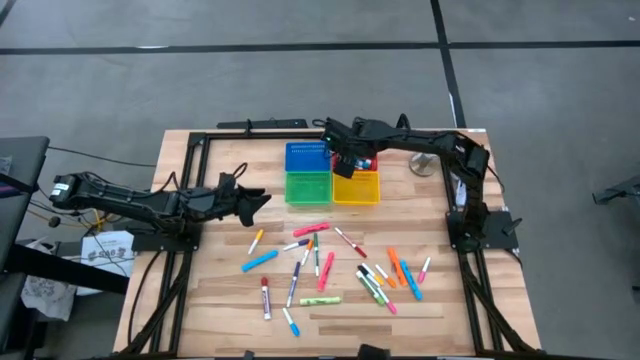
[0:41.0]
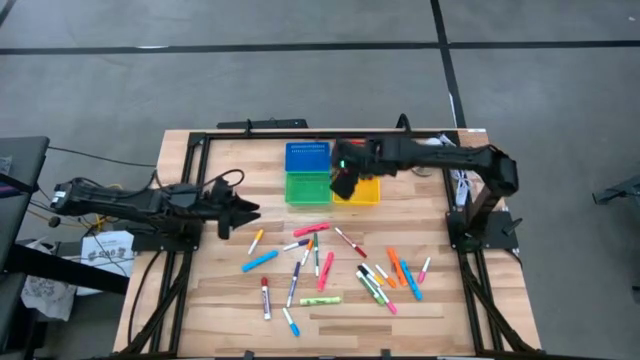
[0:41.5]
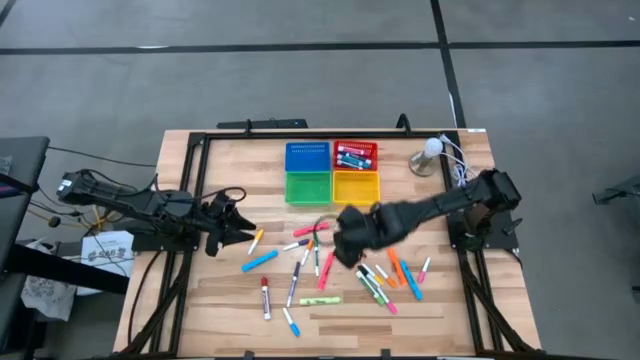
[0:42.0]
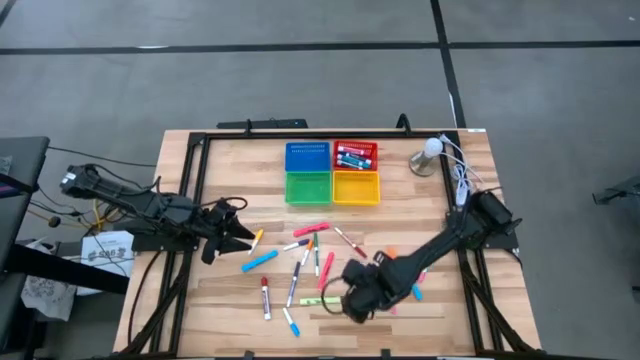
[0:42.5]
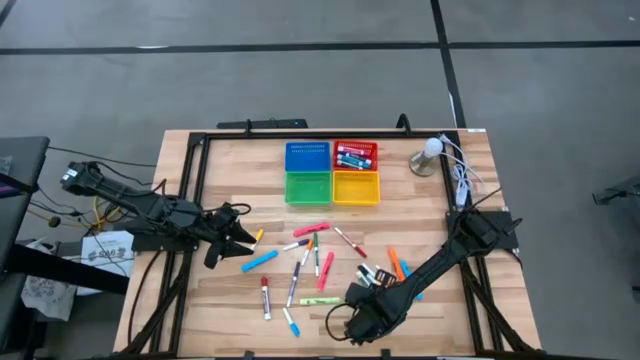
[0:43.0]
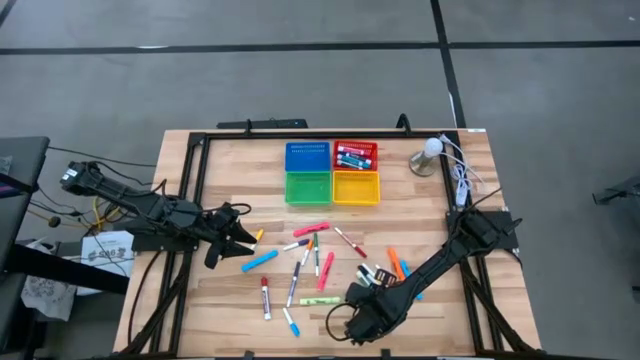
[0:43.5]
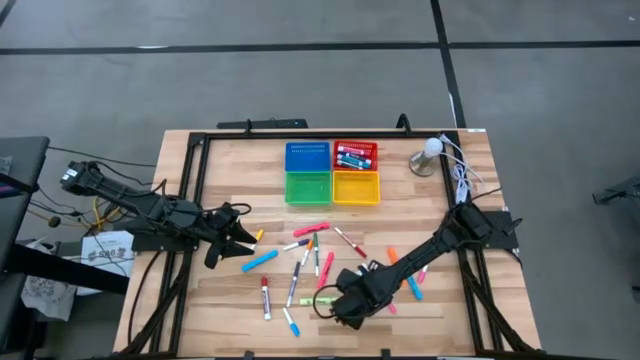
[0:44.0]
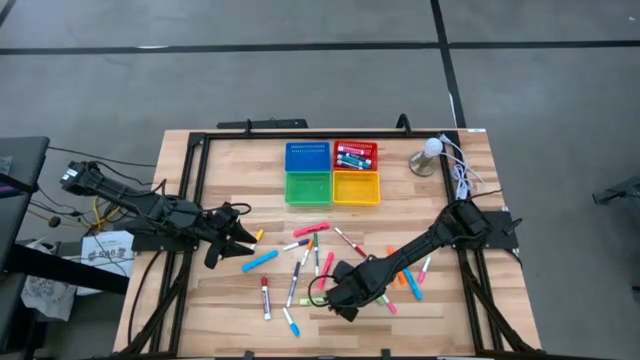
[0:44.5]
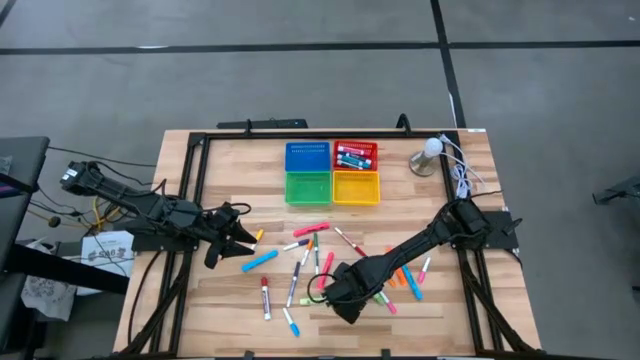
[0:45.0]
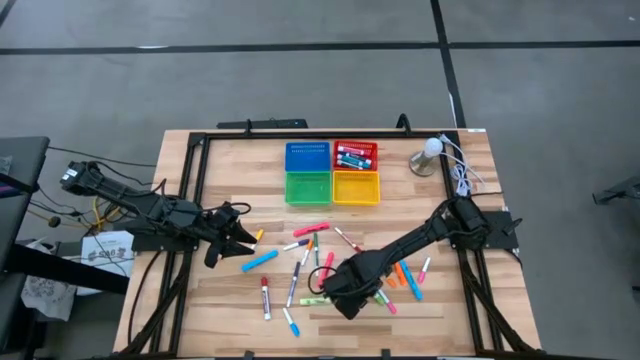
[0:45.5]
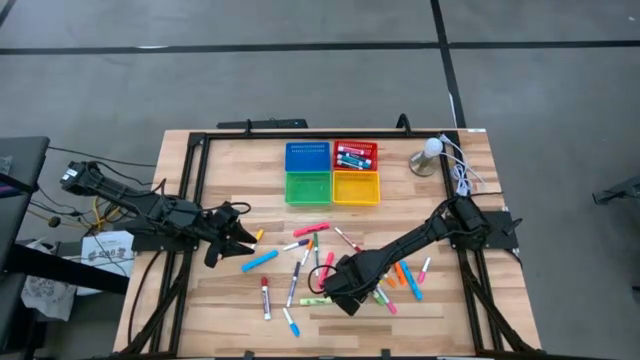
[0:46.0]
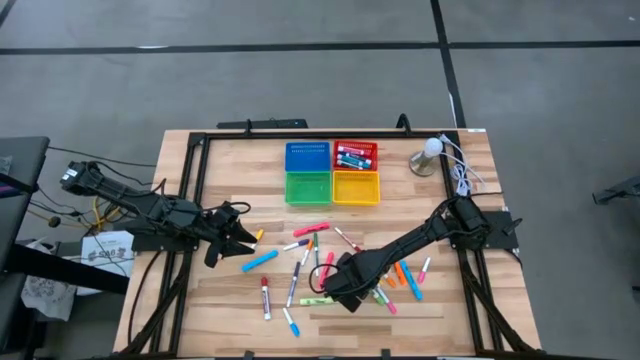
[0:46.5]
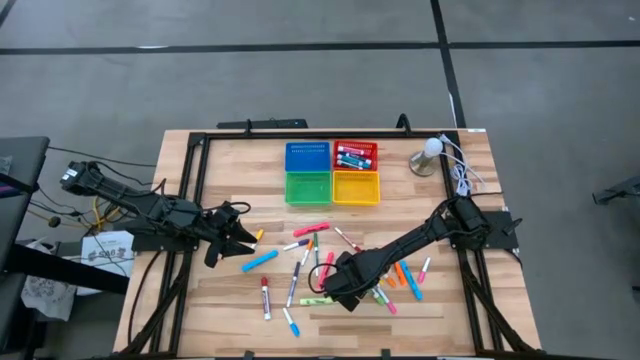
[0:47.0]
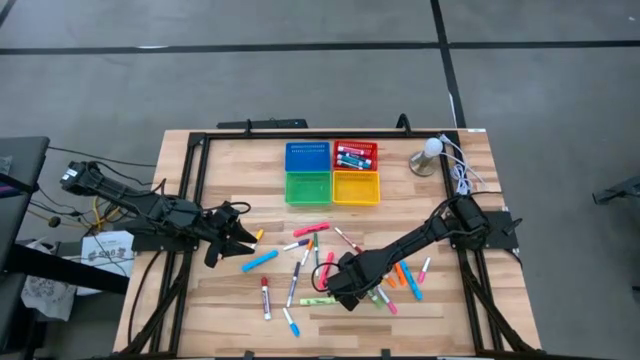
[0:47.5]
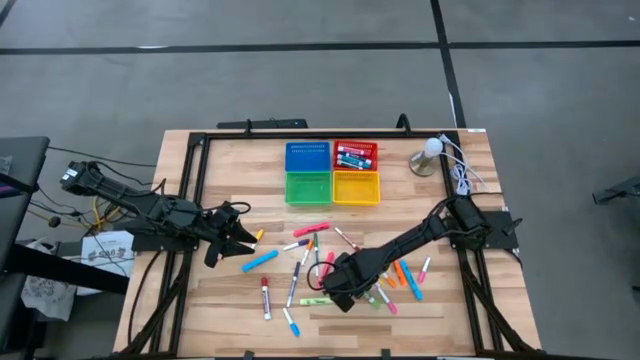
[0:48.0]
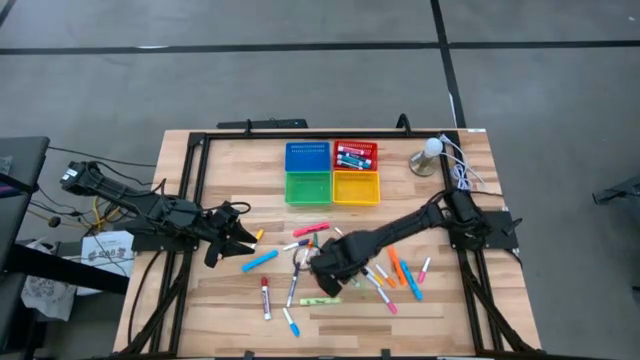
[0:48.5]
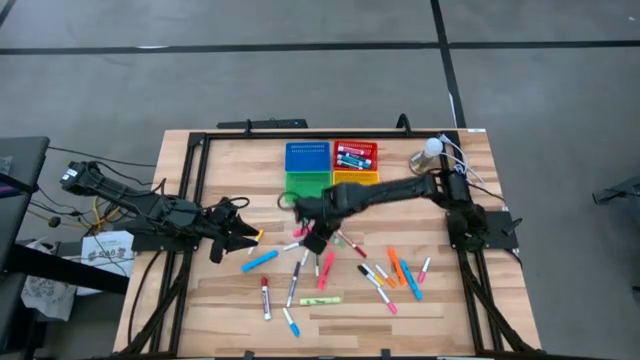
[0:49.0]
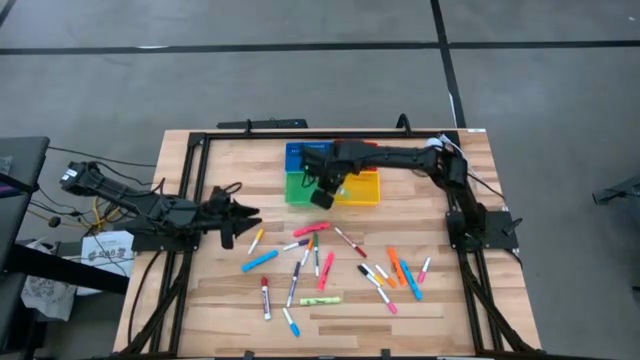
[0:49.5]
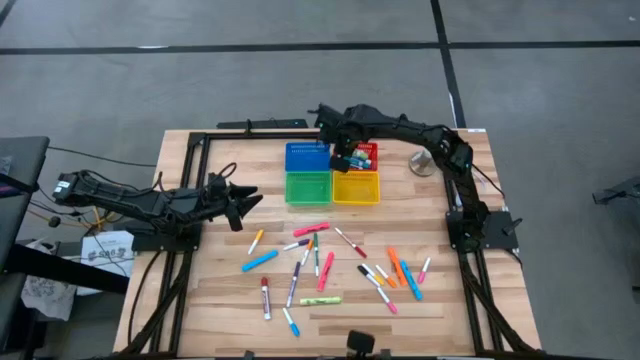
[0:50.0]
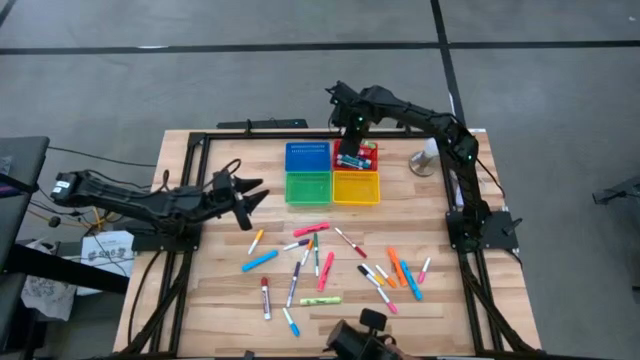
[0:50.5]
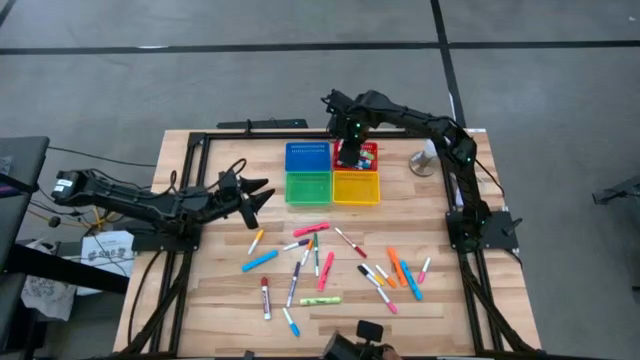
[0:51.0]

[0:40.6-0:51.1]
Task: Pick & Place Markers
Put the green thick dry erase marker into the red bin

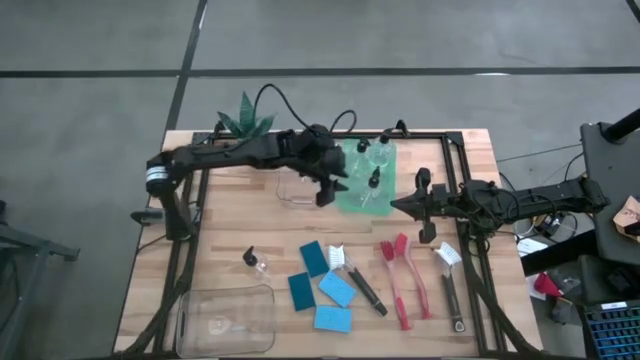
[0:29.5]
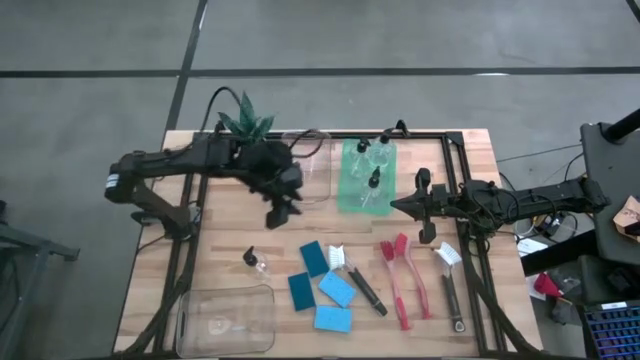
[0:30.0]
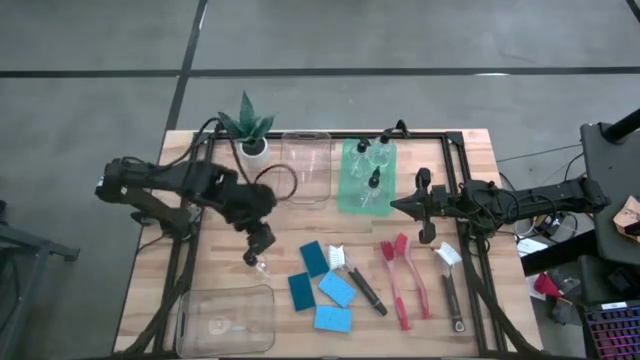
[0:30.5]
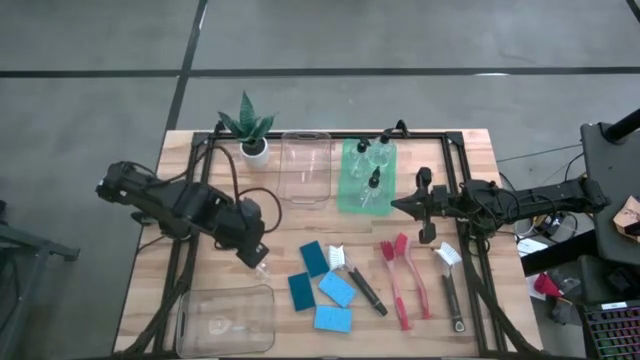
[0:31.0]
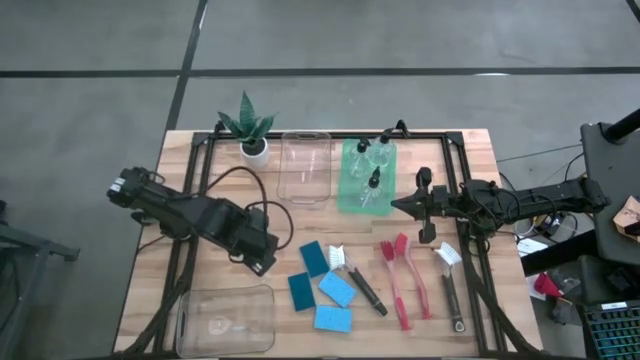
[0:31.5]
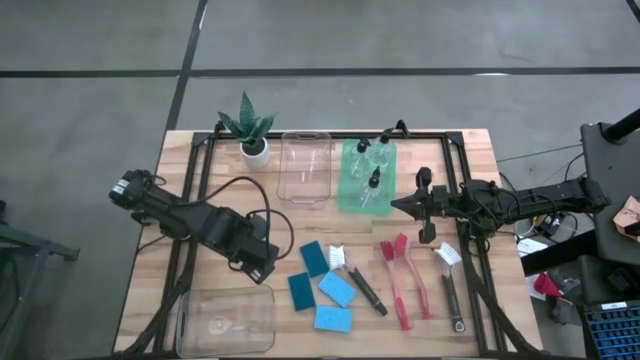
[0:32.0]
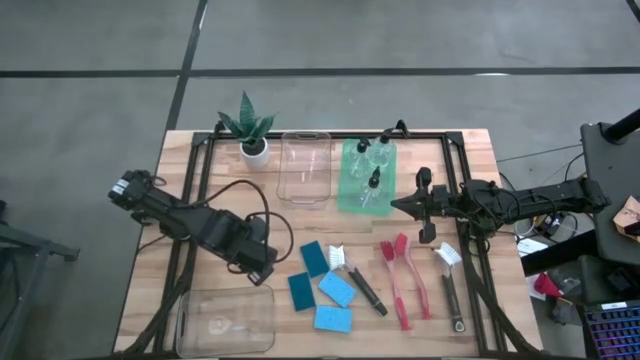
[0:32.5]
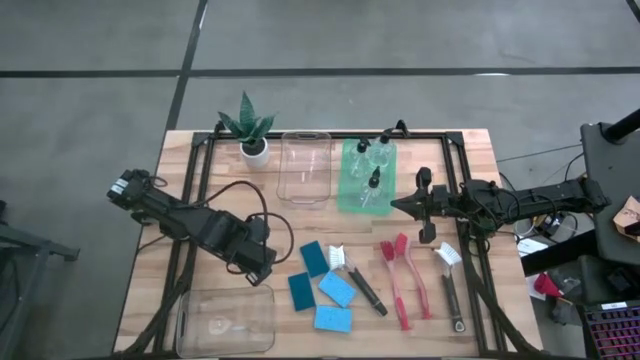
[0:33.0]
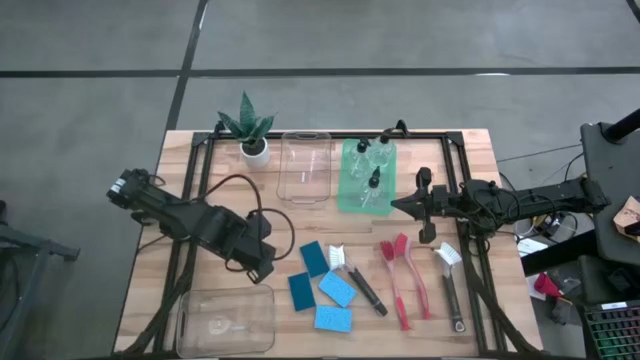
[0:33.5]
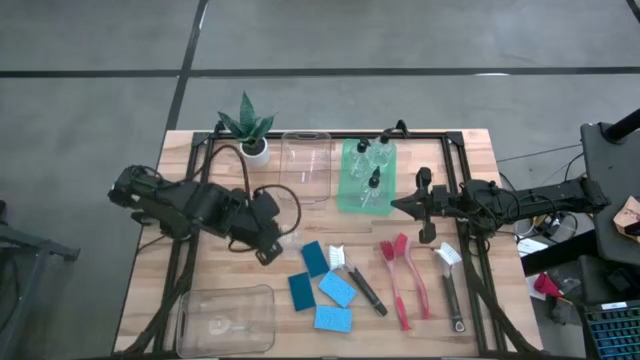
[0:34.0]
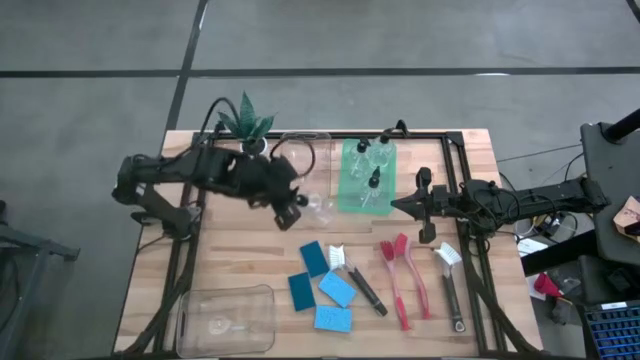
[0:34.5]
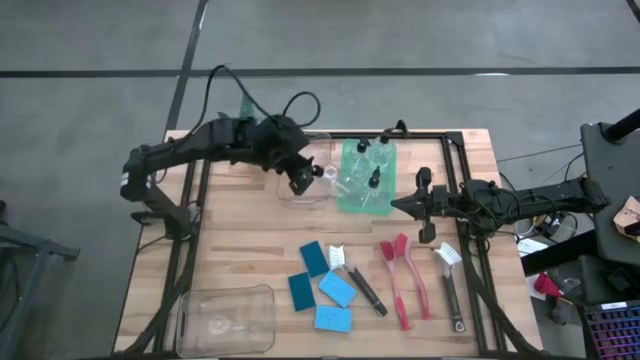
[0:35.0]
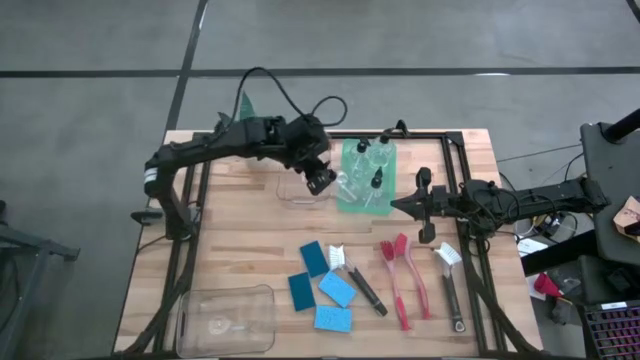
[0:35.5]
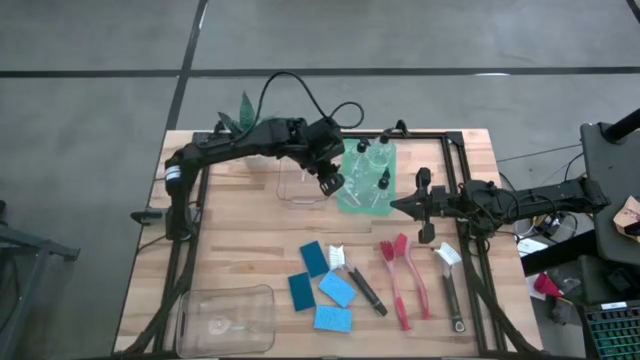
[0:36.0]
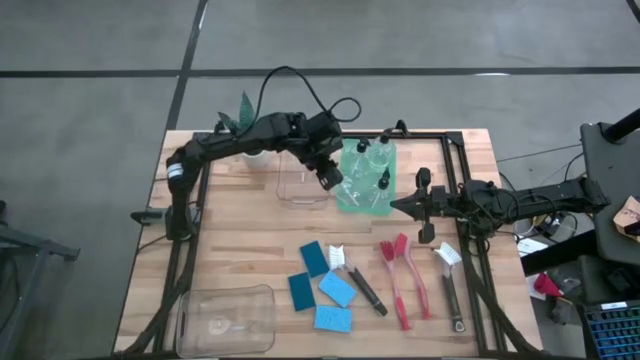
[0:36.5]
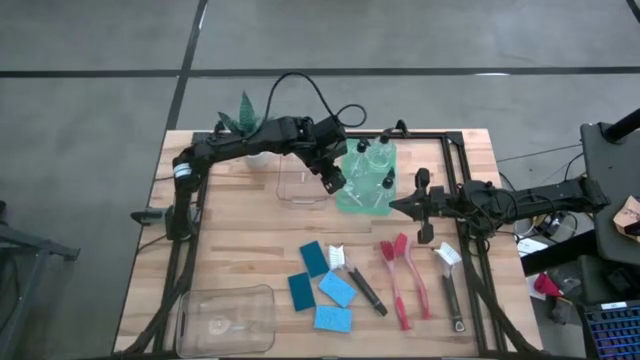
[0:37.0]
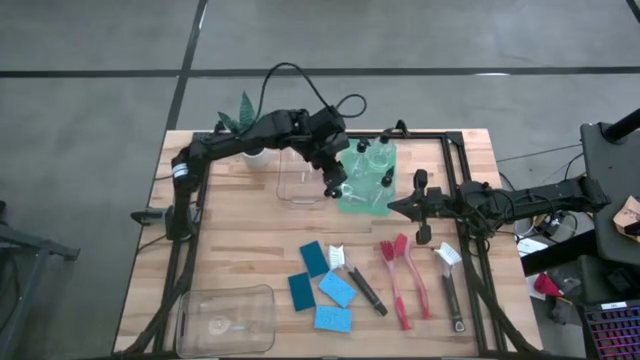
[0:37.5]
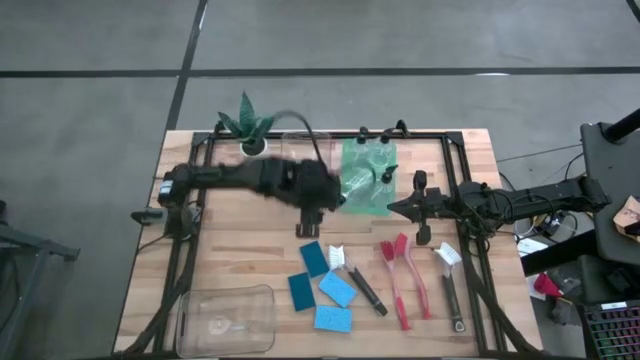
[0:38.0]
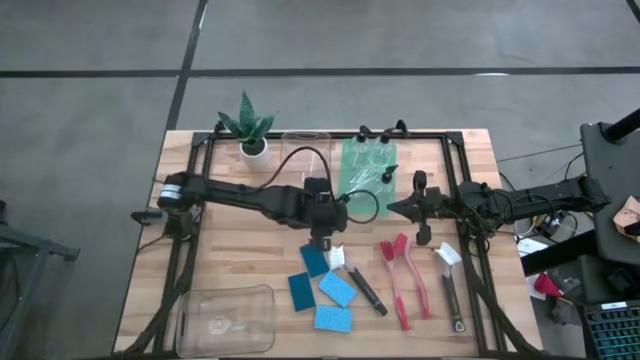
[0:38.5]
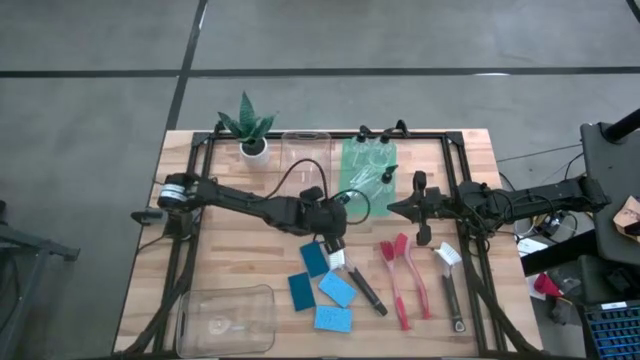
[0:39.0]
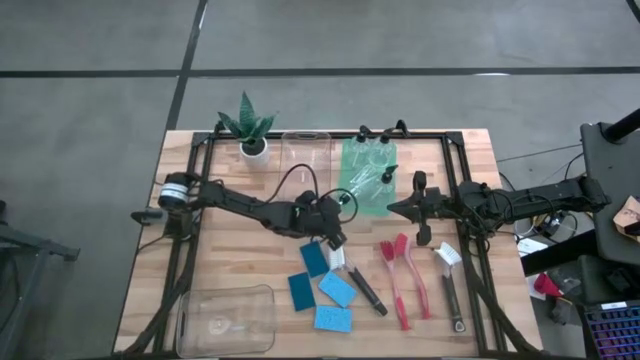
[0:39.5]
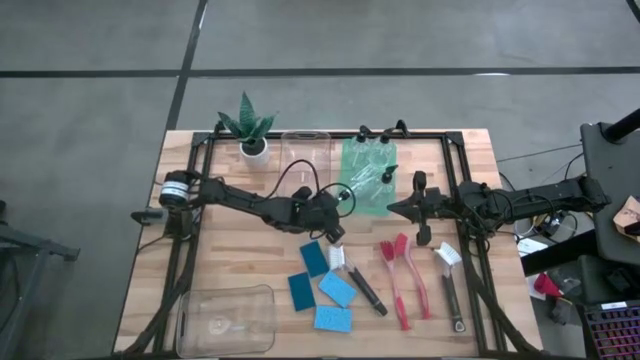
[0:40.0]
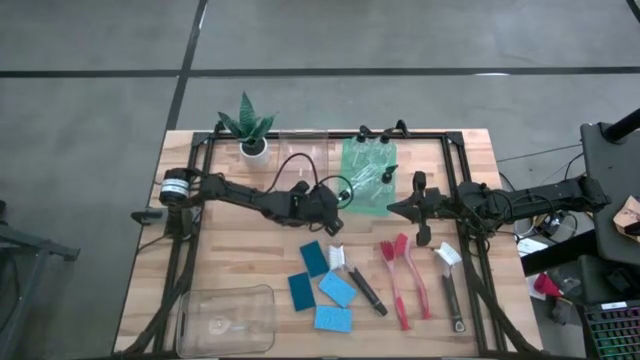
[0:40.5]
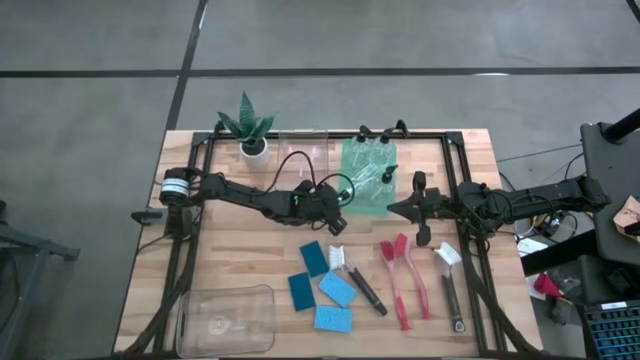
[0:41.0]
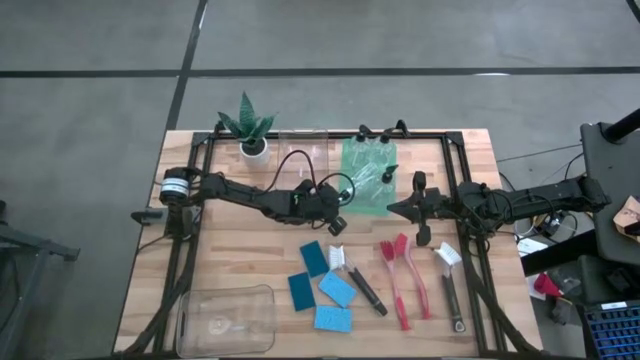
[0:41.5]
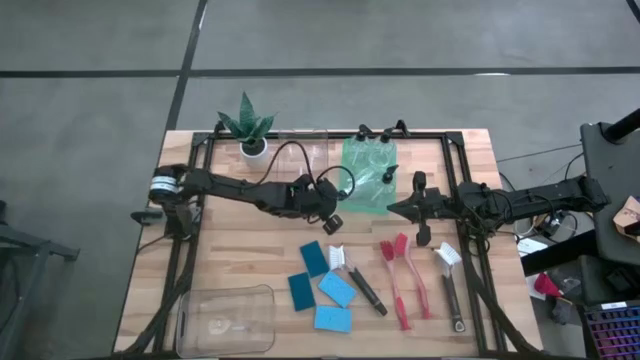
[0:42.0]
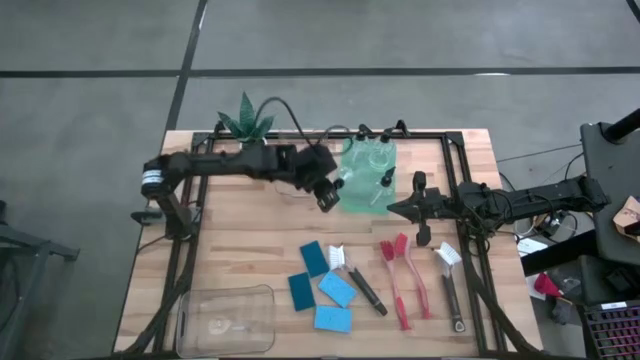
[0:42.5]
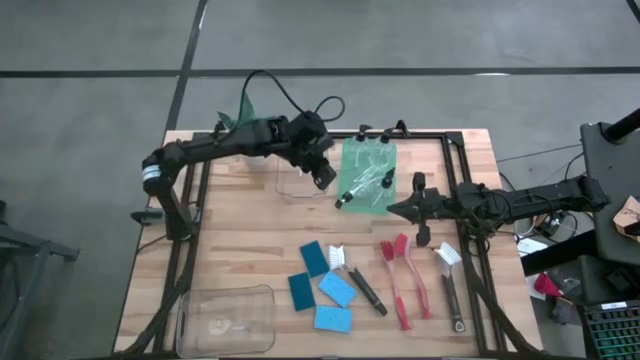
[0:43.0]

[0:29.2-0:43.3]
Task: Pick & Place Kitchen Sink Supplies
Put the transparent soap dispenser into the green bin
